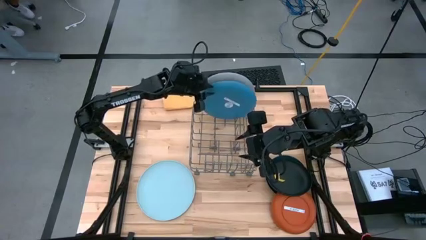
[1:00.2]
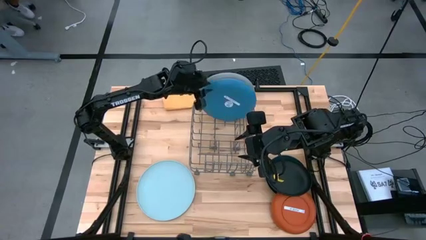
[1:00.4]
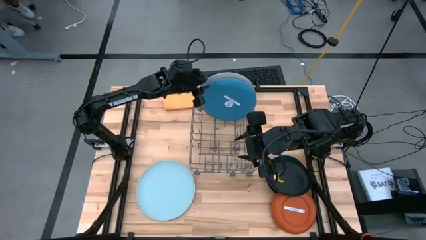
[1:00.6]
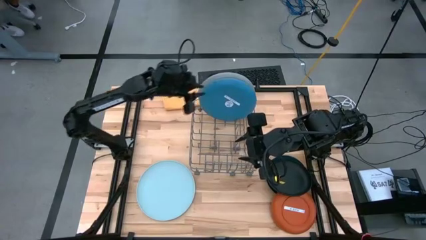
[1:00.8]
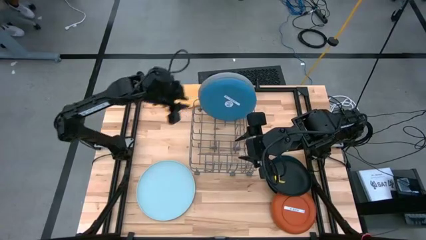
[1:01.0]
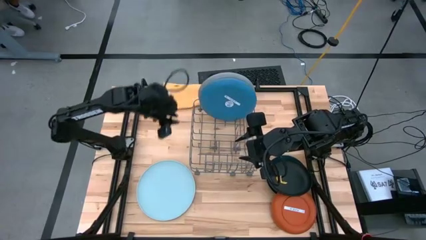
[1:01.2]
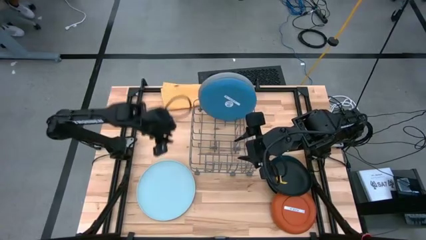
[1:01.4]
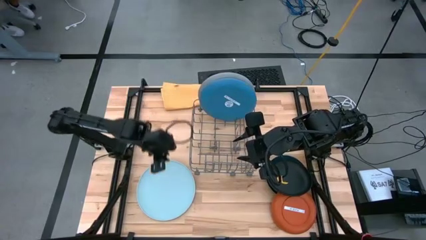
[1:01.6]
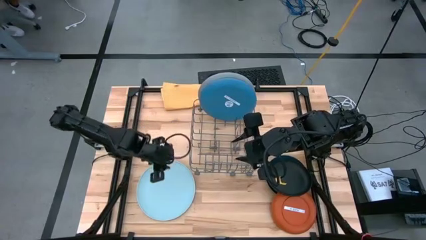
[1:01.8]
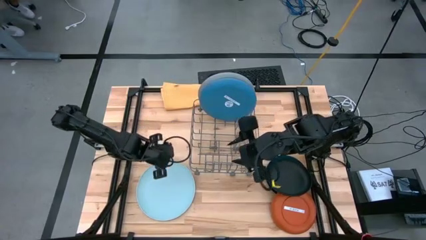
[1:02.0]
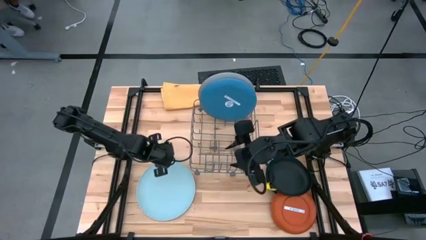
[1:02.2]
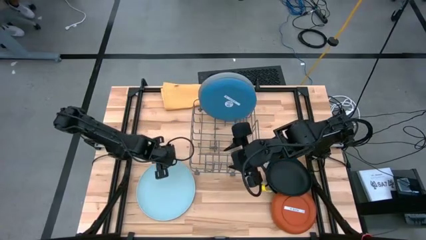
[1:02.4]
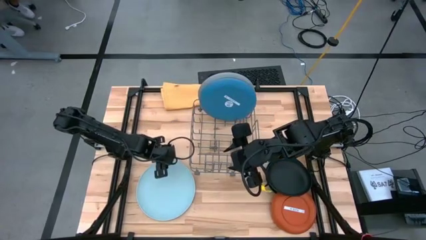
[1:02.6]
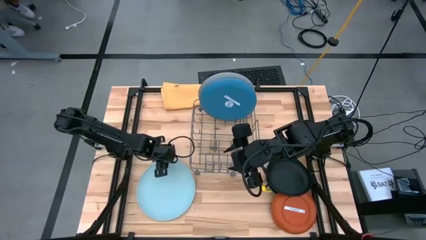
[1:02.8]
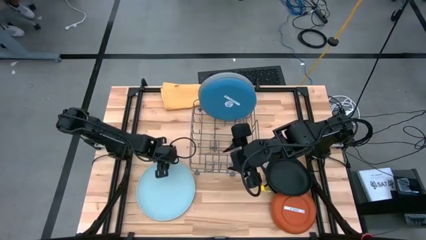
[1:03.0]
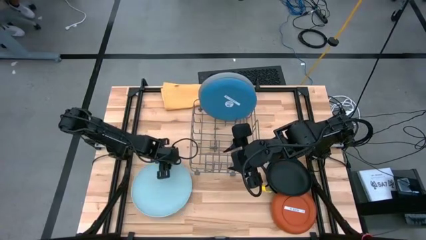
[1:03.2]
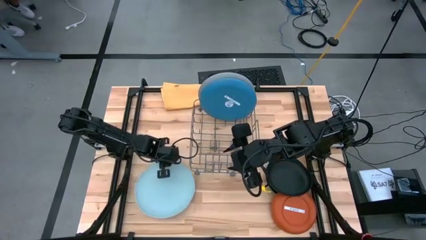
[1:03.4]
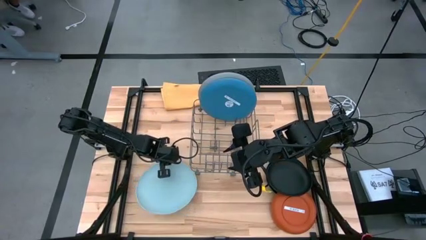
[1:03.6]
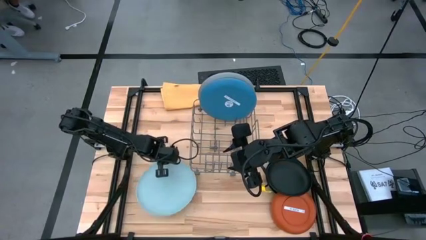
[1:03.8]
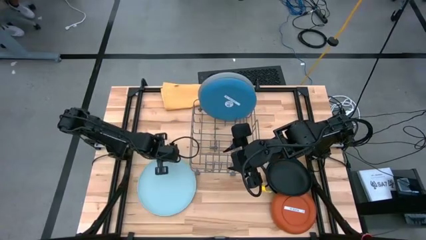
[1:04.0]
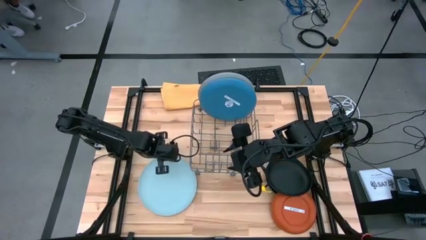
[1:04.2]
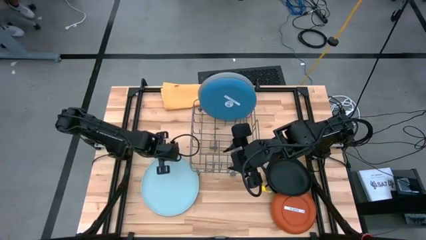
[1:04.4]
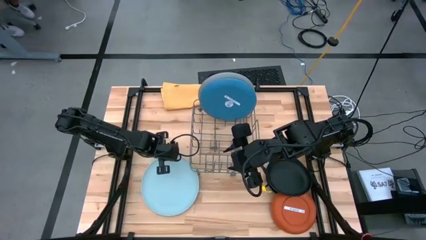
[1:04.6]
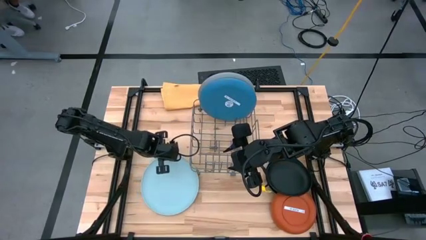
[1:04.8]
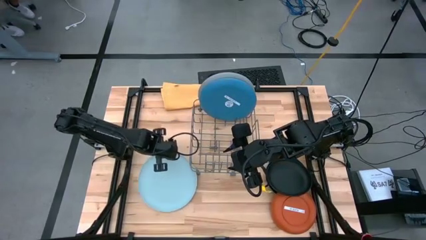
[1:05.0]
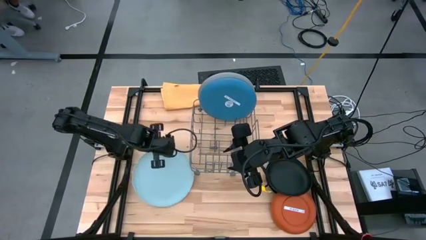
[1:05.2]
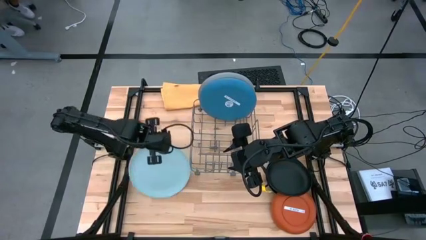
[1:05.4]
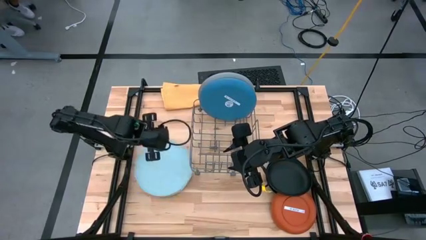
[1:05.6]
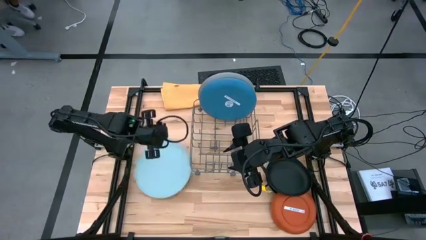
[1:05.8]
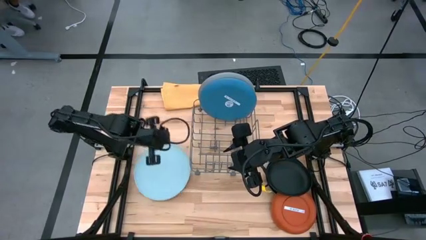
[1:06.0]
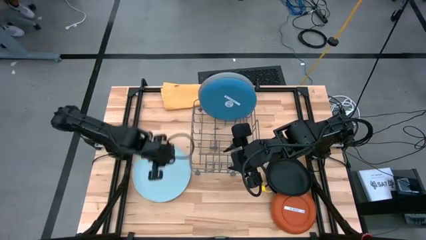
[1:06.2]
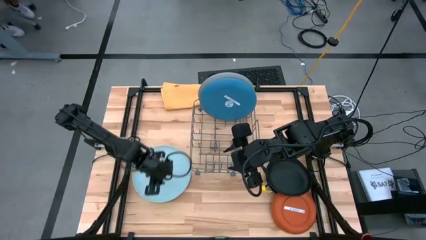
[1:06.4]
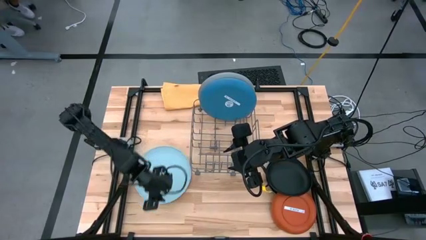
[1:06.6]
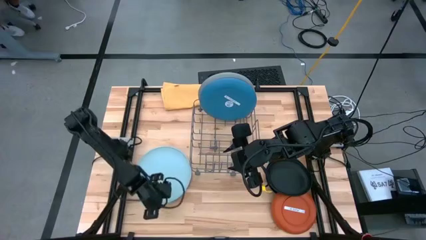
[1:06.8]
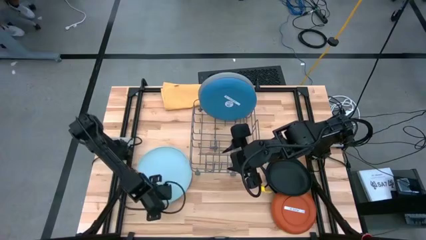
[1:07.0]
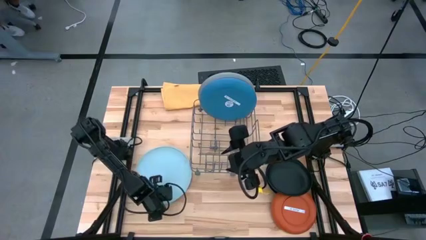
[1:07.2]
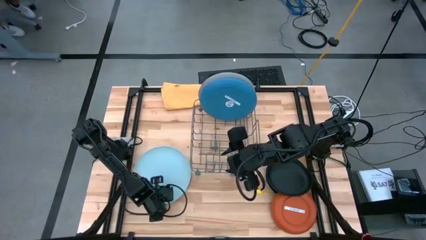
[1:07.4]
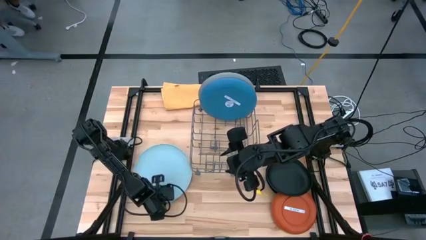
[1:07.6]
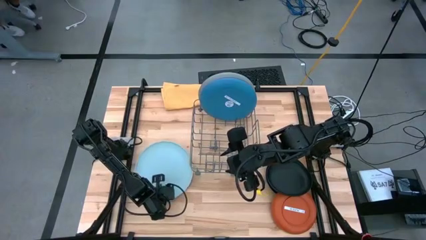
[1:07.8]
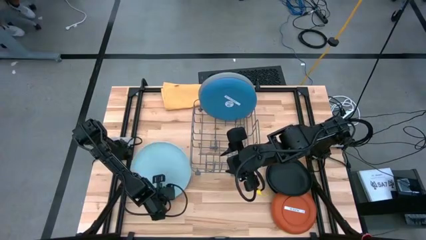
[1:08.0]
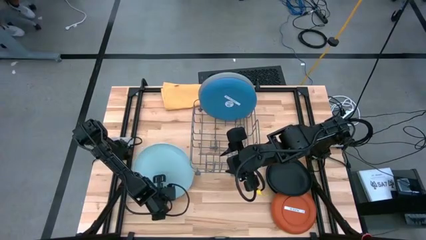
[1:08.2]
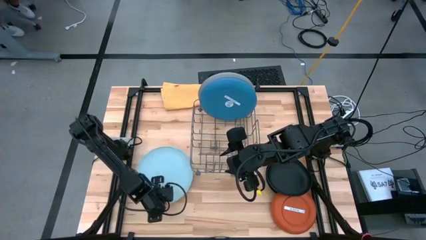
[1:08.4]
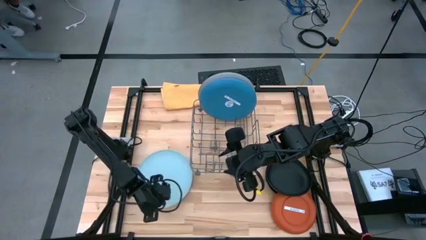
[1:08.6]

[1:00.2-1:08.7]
Task: Sort dishes
Put the light blue plate into the dish rack

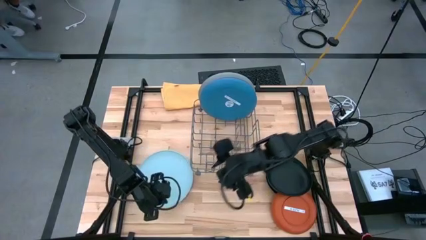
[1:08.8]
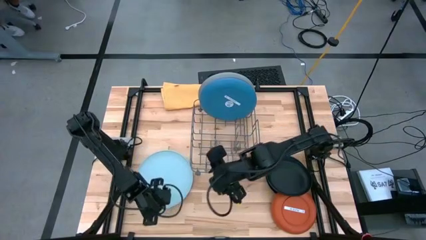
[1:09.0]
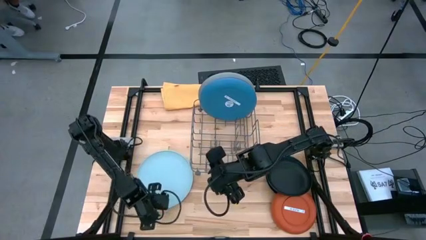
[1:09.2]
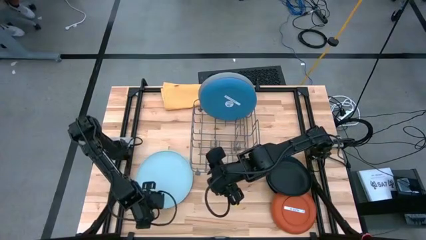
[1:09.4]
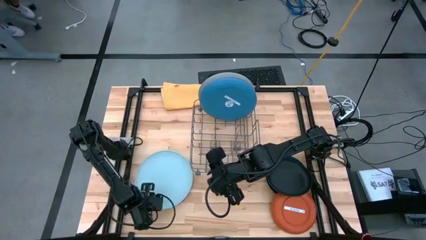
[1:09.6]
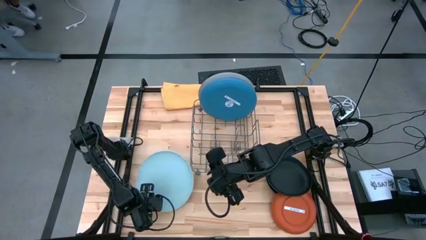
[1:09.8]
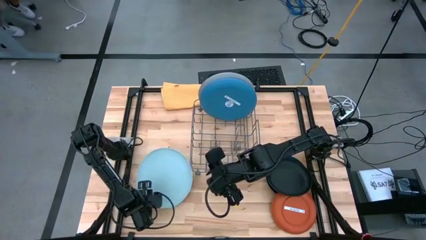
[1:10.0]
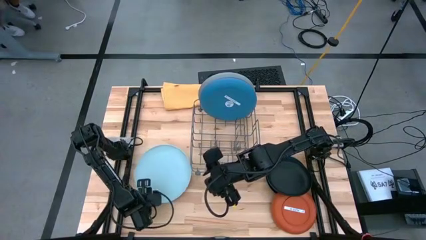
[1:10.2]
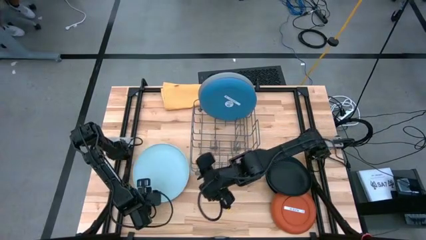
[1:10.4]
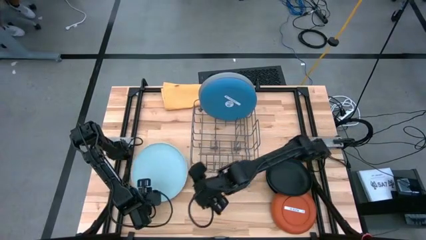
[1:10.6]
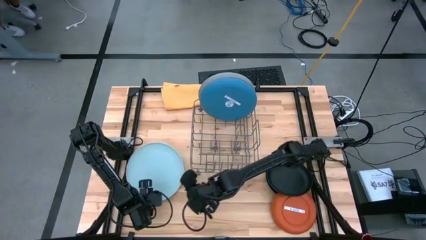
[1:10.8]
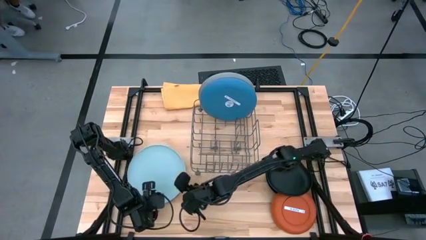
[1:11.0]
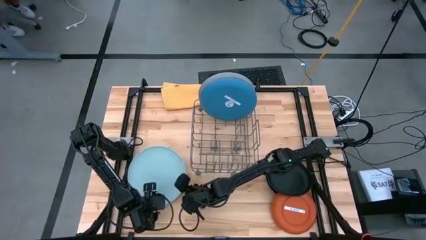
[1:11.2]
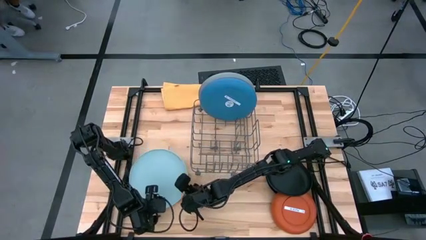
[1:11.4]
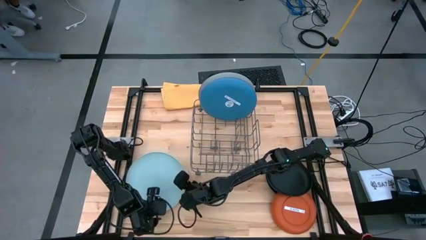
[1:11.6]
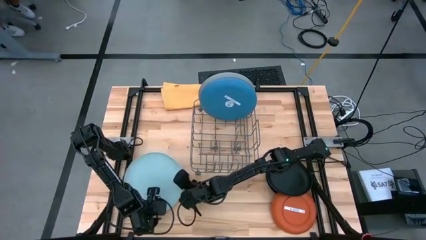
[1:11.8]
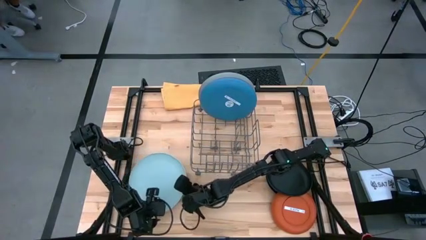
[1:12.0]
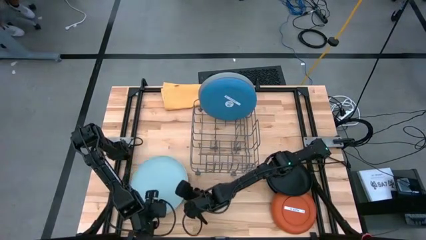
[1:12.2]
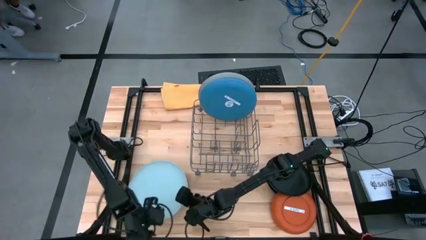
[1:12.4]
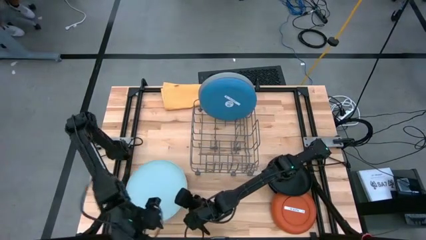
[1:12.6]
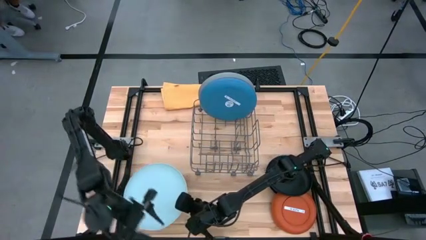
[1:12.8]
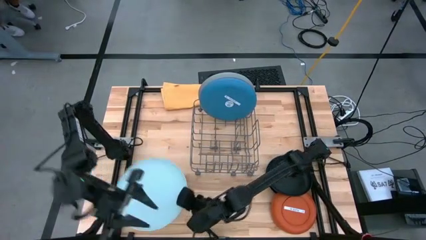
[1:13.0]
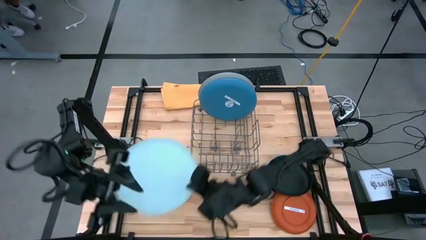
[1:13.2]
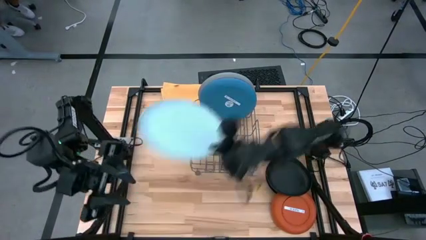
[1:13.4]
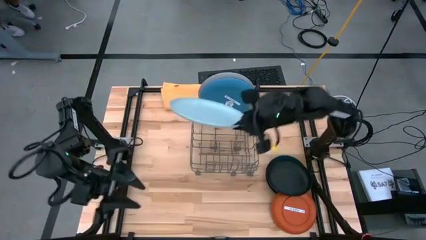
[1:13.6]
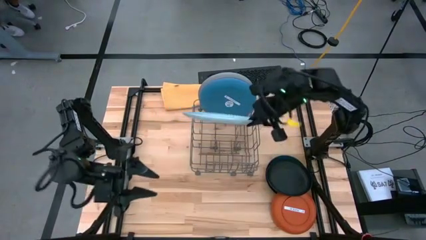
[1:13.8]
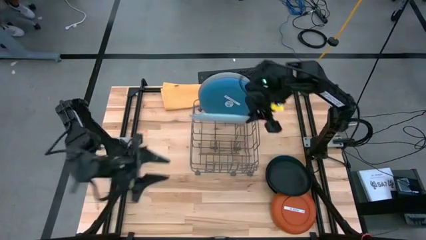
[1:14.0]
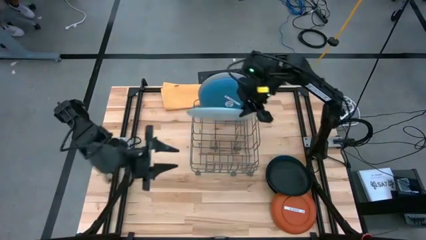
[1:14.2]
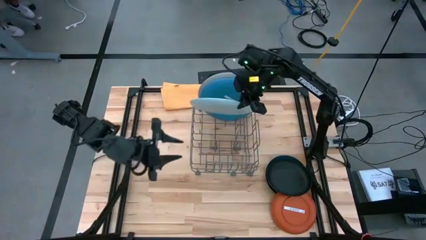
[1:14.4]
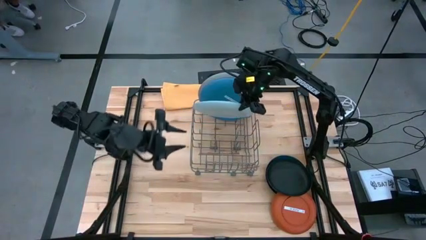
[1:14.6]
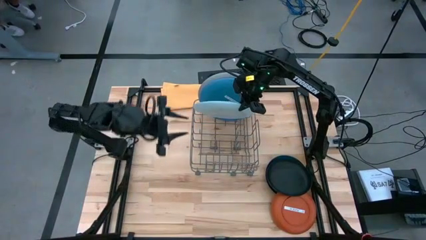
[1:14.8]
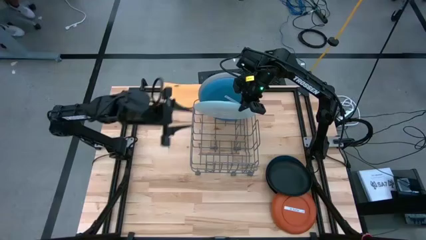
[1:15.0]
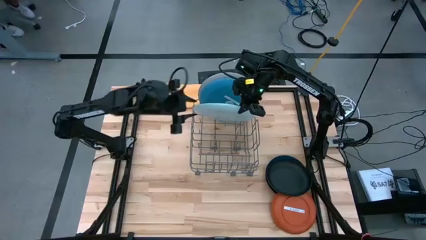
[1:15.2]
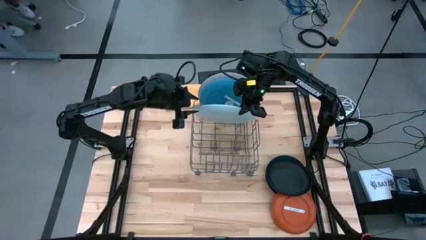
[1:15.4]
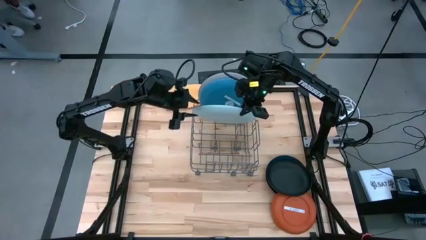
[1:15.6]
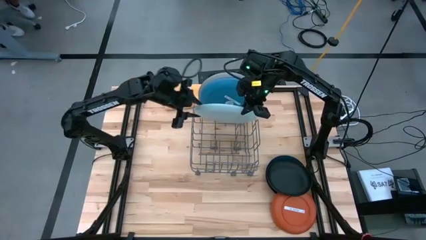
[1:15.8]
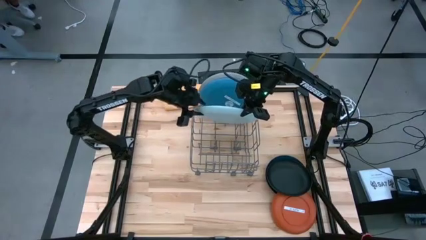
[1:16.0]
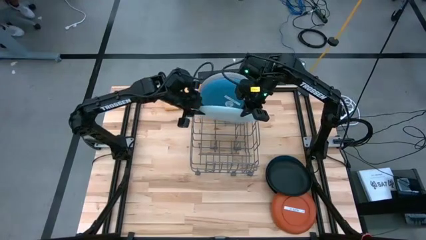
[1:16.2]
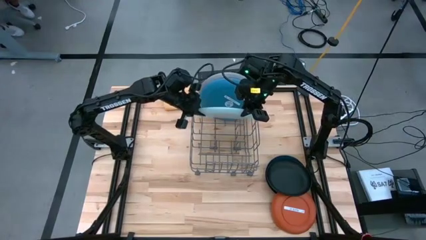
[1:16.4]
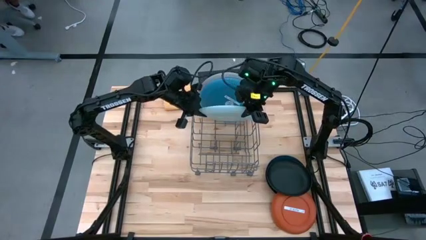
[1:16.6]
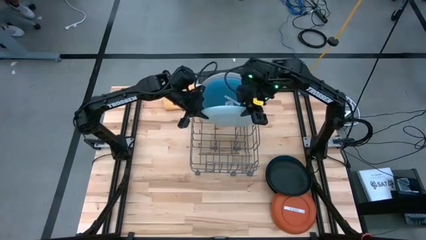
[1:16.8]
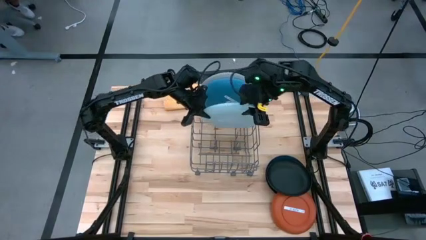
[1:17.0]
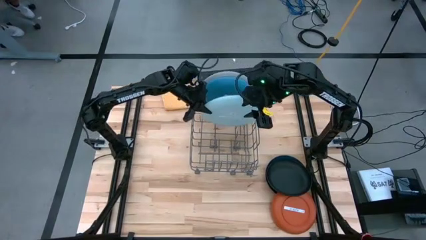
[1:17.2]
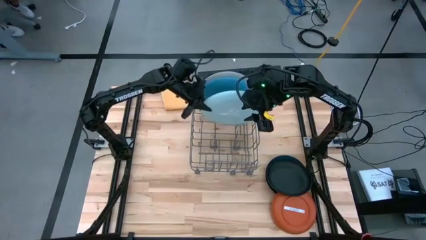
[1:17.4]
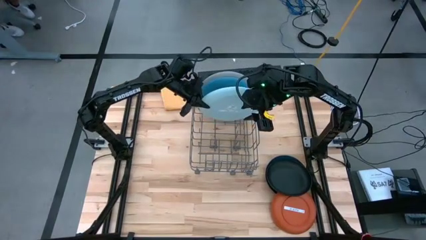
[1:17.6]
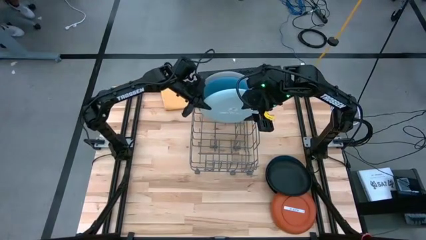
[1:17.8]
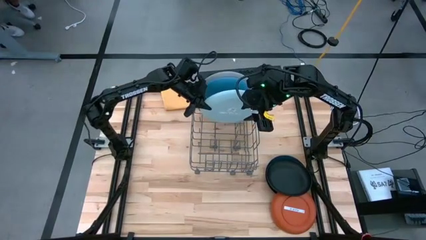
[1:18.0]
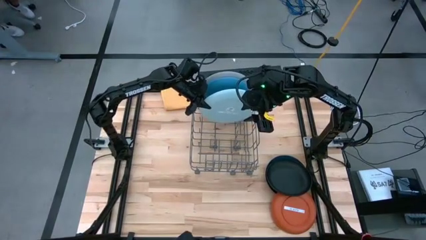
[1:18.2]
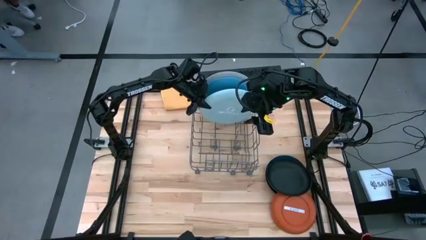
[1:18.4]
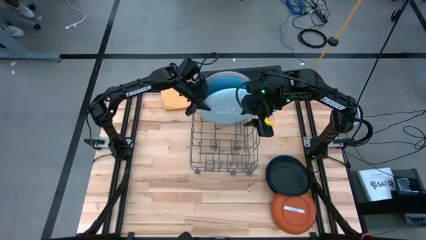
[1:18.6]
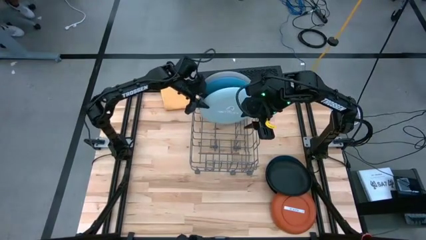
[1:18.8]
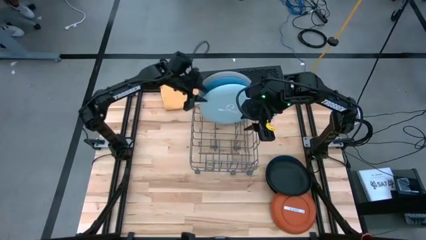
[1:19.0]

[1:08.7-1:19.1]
Put the light blue plate into the dish rack
